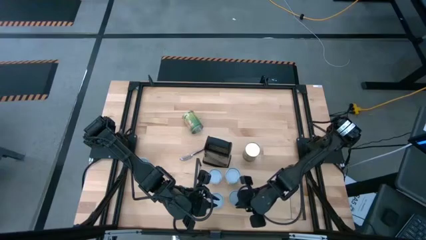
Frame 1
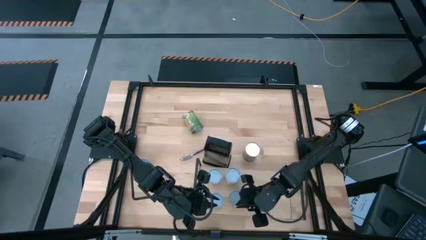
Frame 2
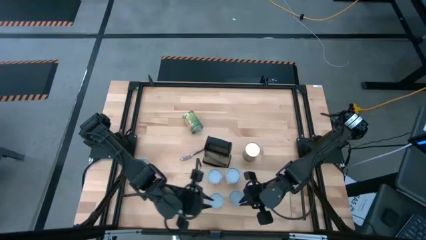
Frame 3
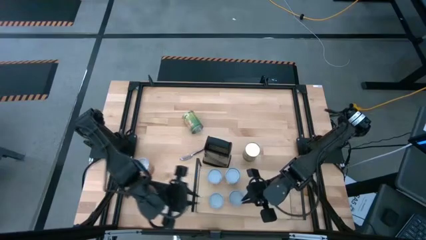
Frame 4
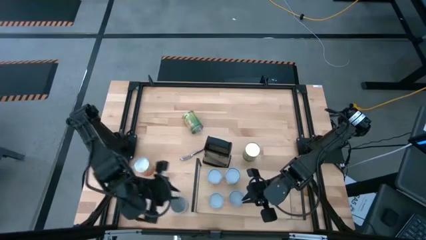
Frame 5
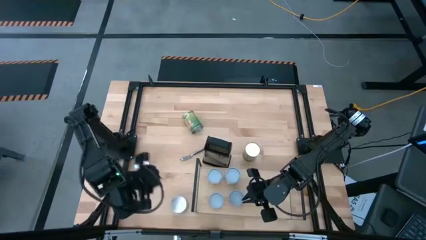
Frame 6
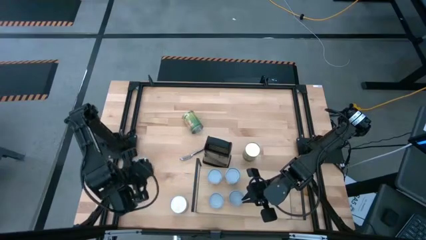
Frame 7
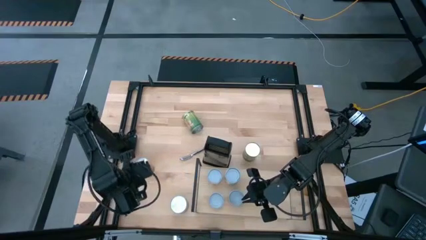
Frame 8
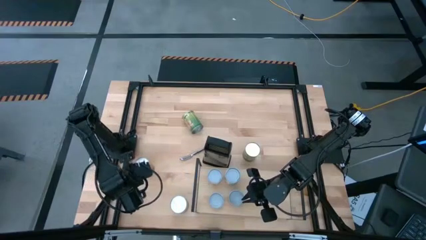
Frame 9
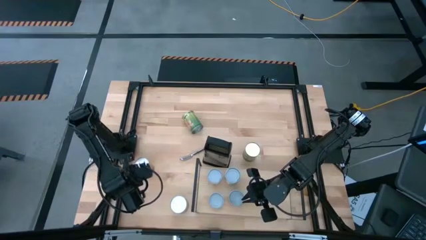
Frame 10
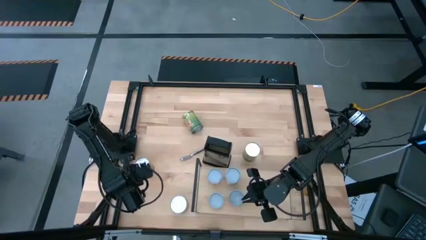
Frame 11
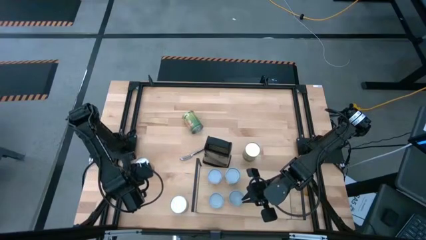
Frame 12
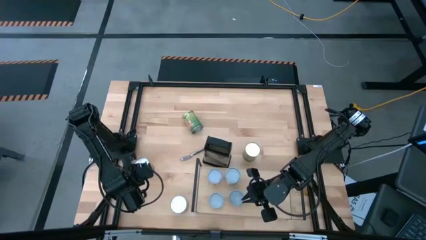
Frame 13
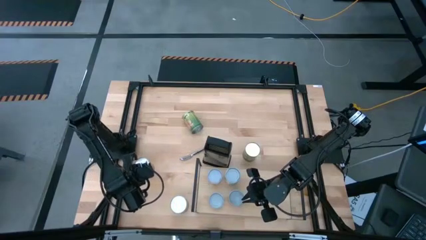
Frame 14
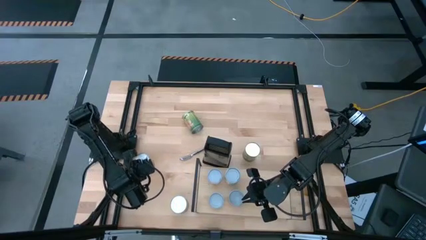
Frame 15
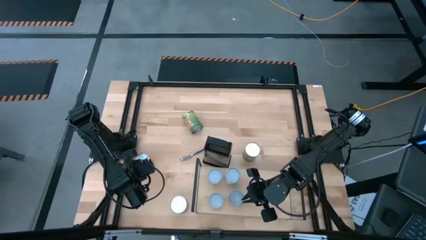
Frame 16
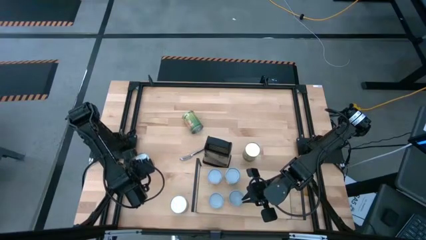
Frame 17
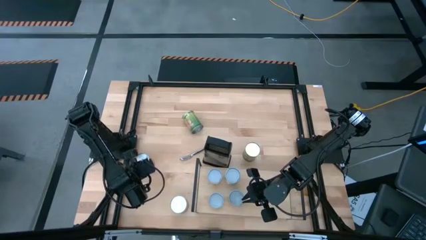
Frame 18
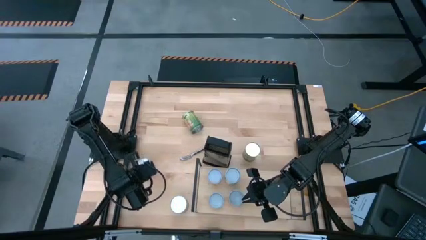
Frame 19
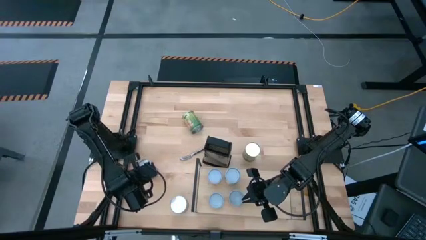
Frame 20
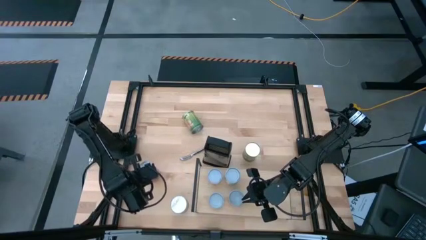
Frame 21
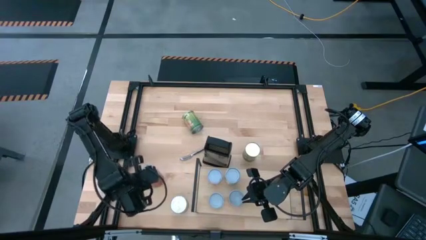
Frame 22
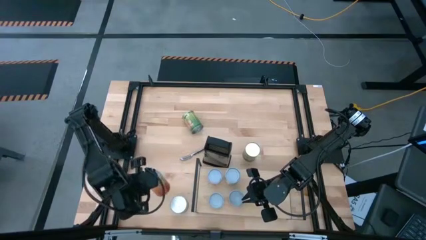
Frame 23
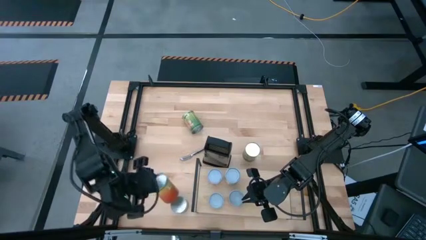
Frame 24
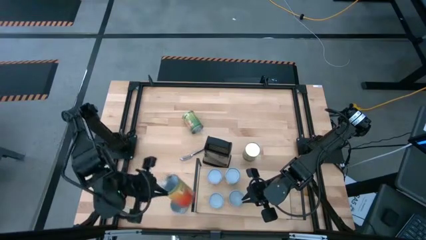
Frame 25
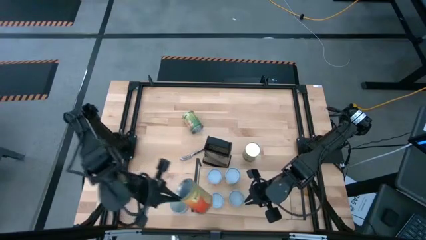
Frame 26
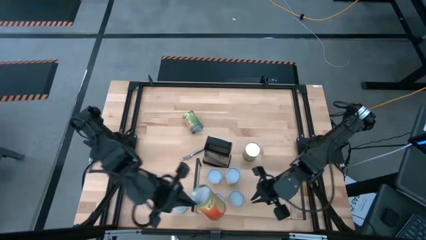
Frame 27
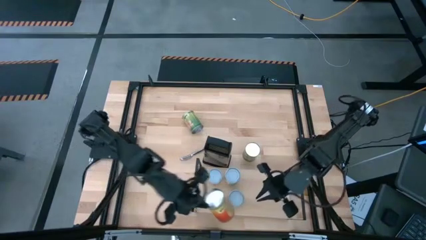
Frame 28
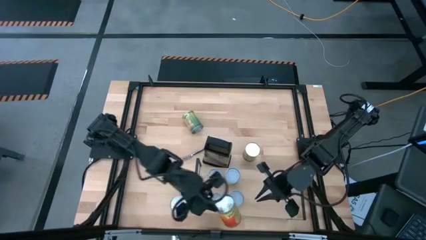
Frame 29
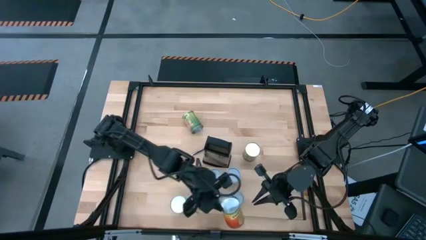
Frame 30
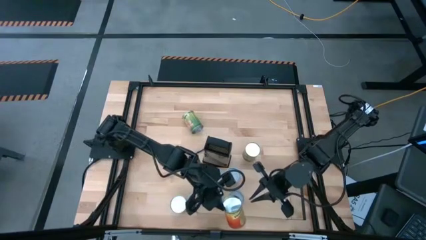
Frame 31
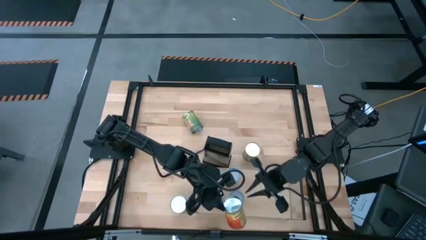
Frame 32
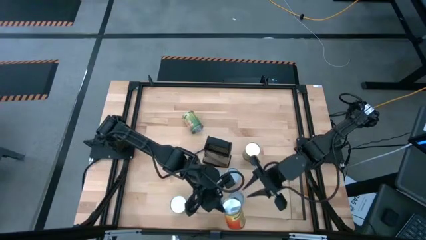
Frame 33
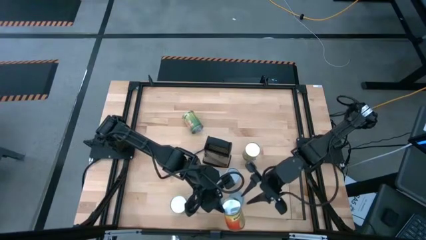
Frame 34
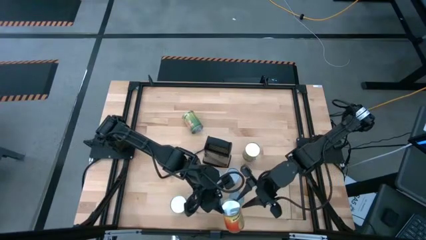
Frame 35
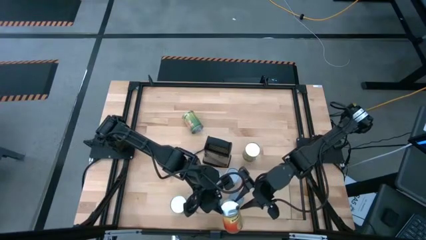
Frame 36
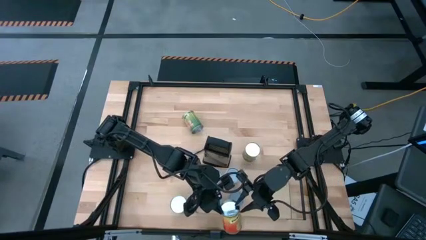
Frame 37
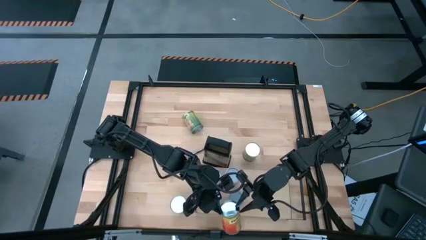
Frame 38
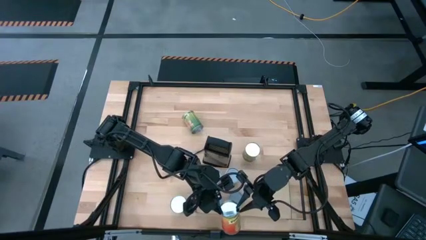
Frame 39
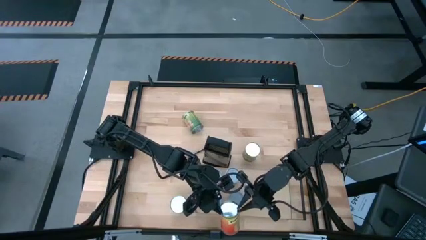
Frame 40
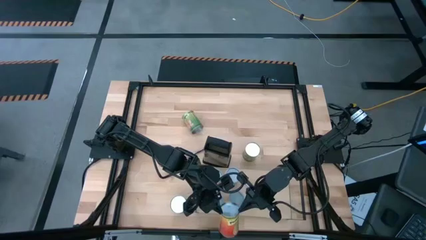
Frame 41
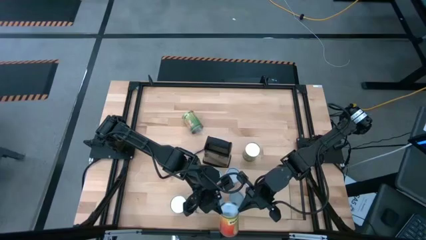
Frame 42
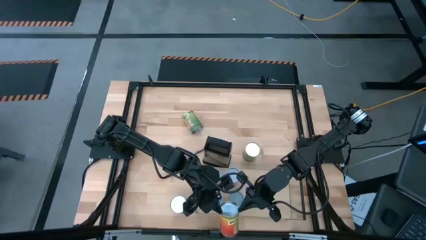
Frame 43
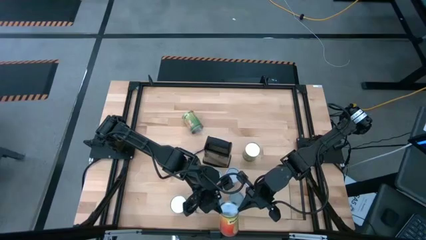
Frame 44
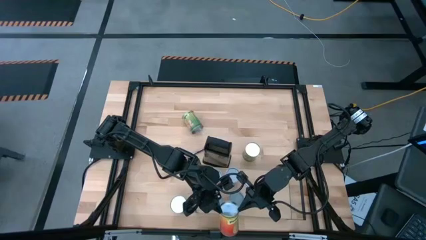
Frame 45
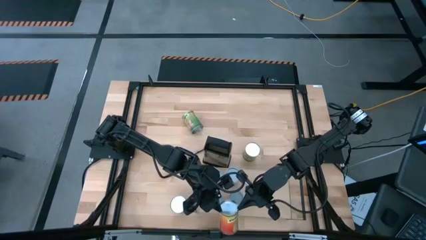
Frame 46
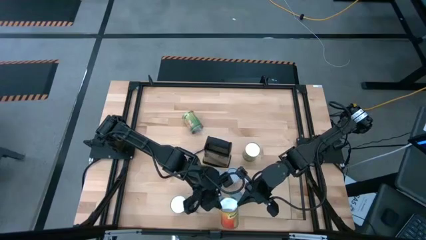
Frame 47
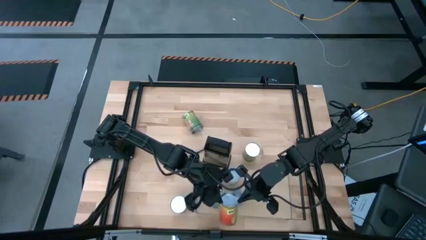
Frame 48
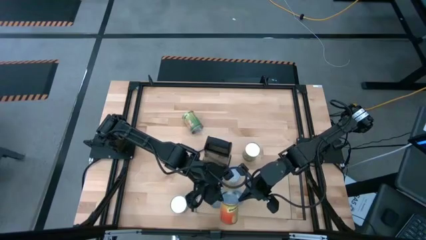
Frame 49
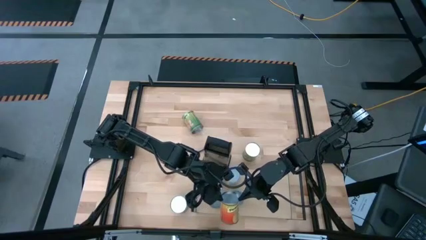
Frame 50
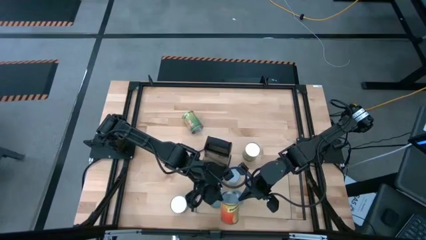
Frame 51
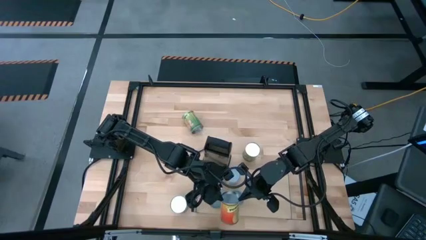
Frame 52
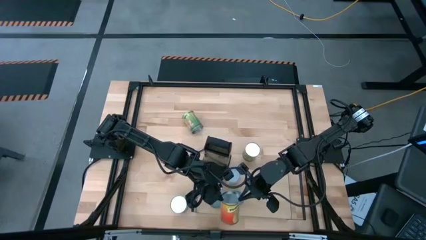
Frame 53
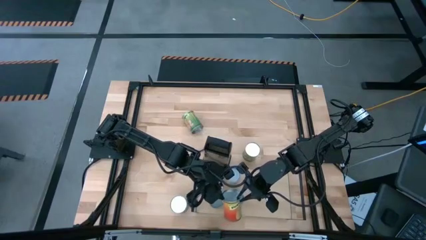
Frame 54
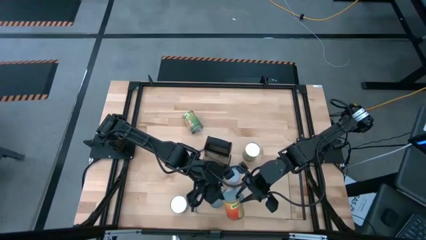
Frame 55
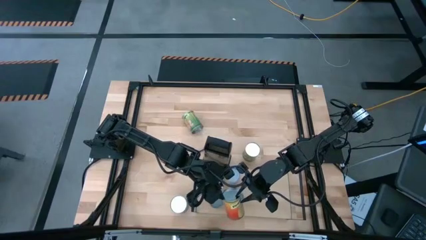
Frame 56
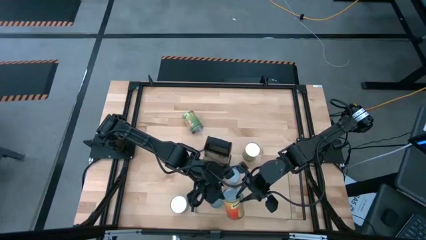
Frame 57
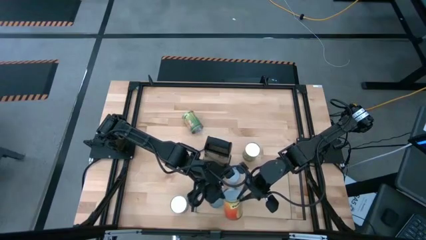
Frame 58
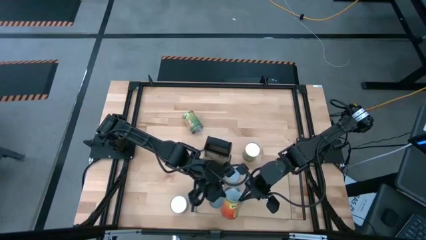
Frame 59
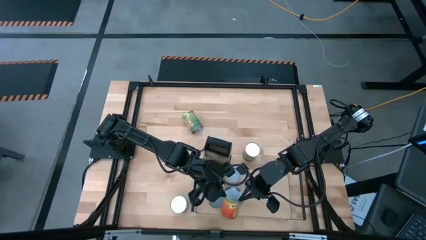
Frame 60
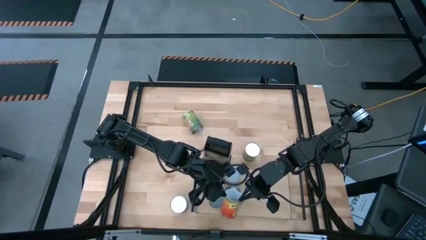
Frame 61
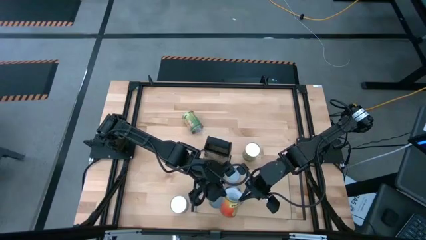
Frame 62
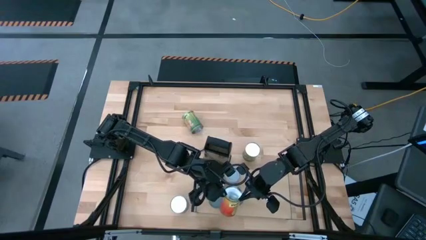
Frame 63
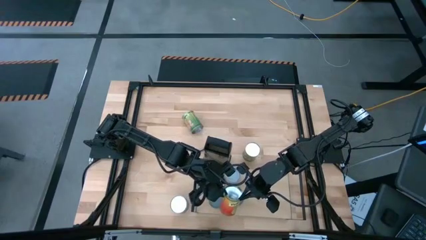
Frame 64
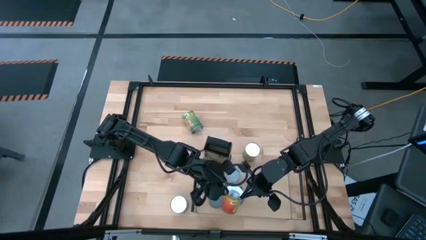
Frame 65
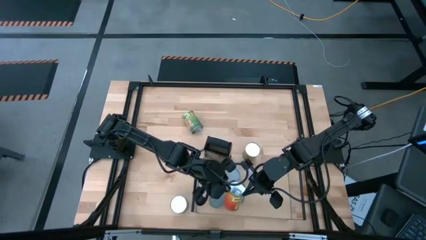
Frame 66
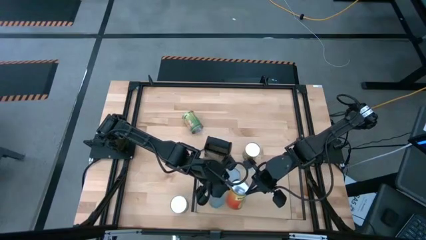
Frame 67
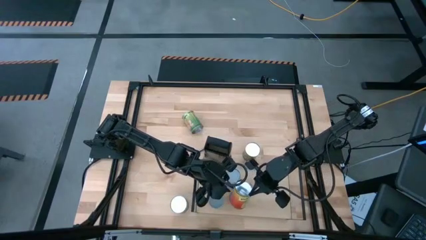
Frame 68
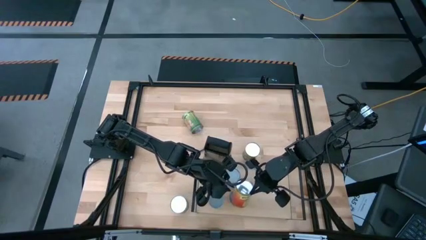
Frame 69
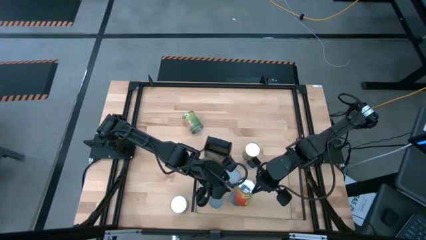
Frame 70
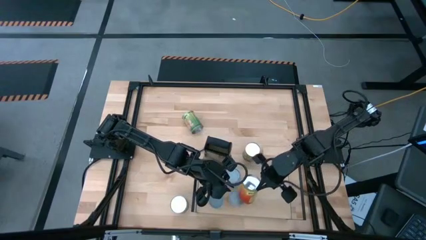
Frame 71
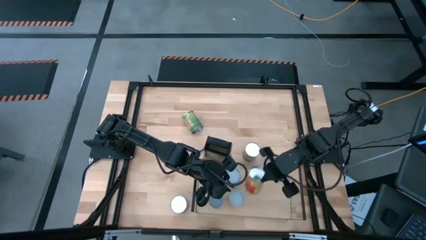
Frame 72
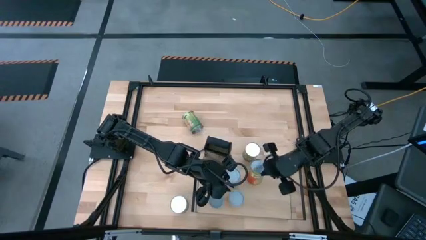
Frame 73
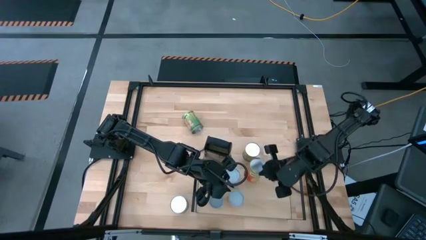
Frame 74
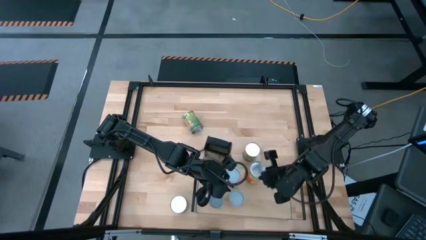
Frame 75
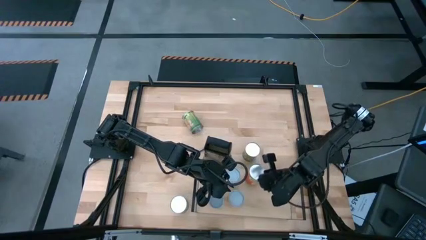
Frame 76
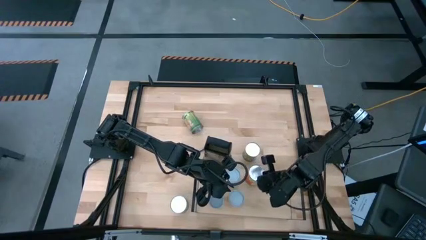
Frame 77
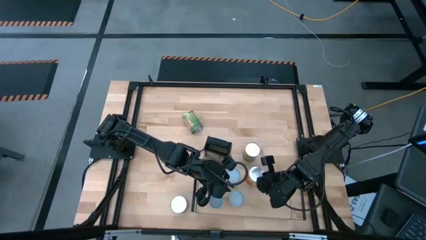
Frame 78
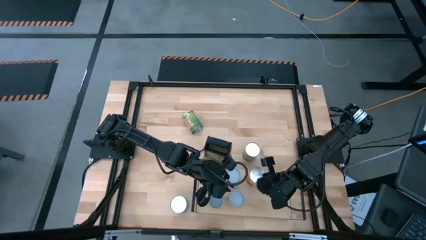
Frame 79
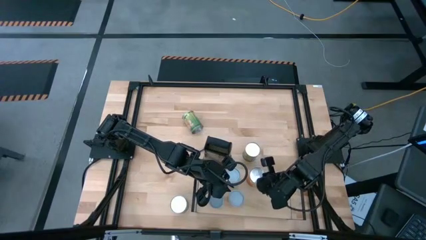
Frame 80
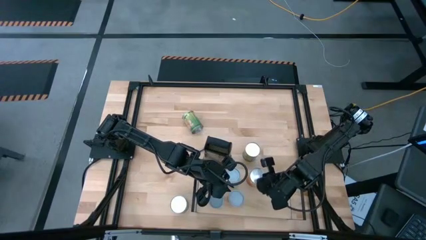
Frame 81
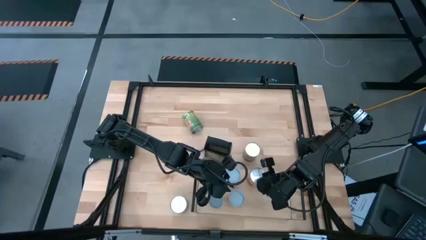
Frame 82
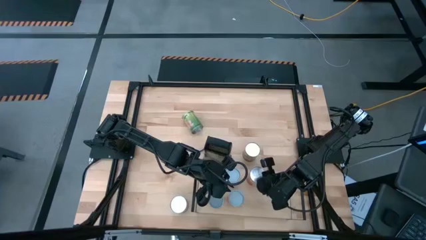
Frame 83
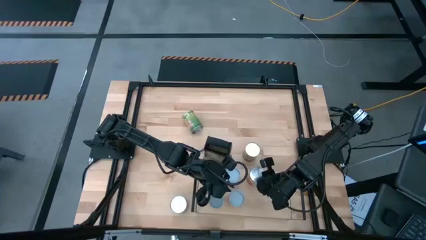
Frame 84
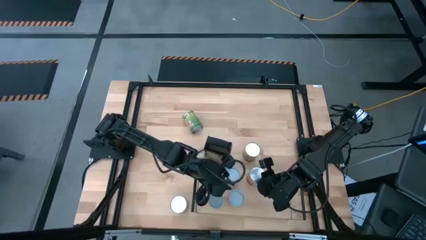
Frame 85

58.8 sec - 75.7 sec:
Task: Pick and place cans onto a shelf
Put the canned pineapple on the shelf
